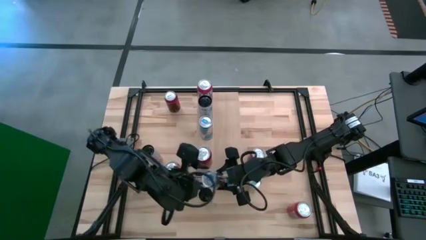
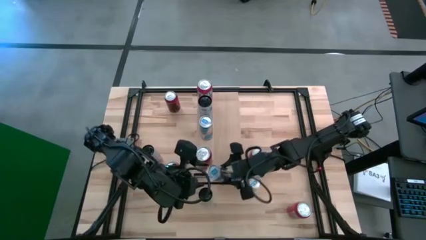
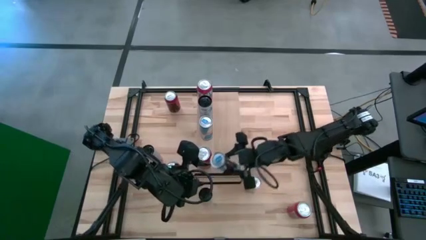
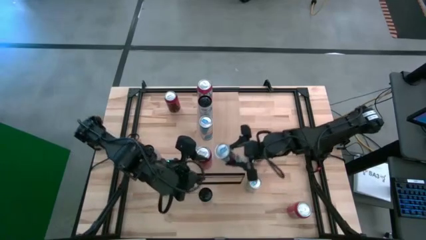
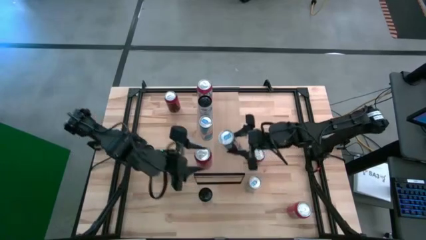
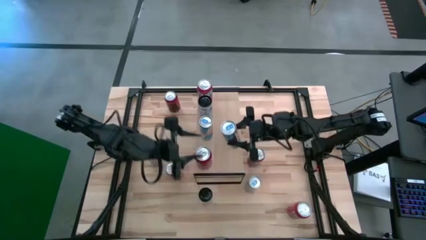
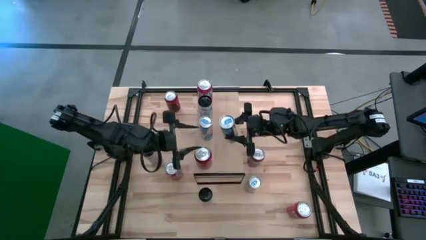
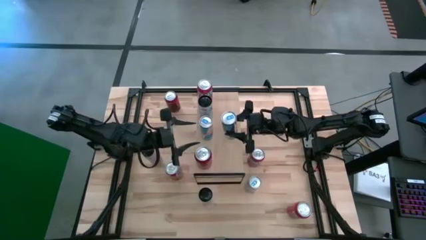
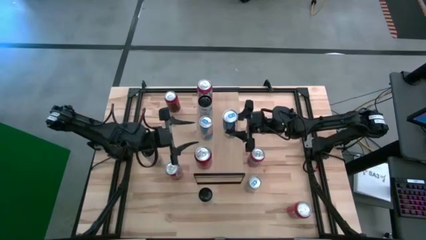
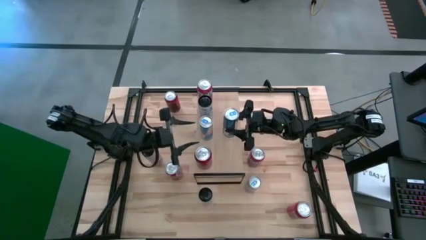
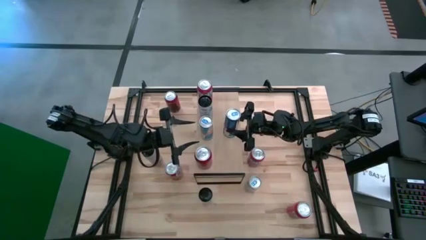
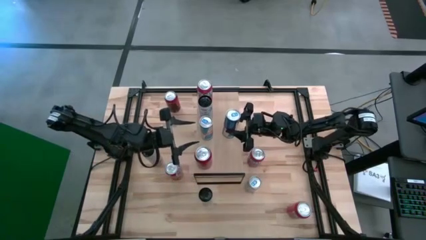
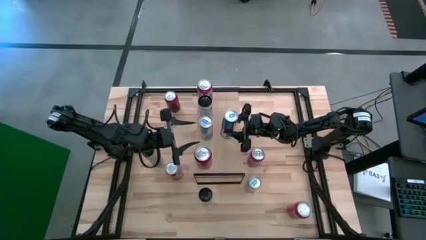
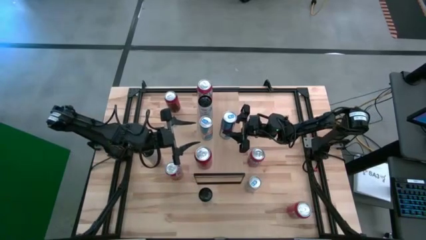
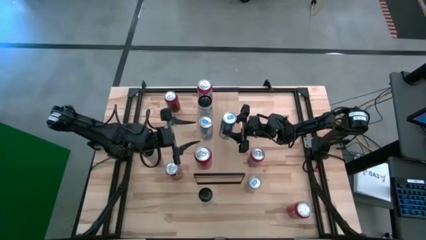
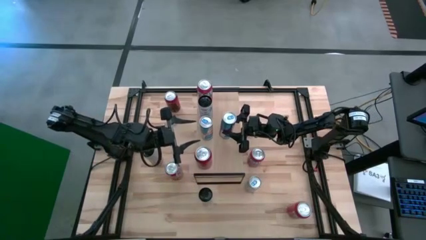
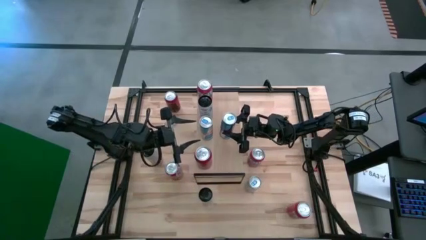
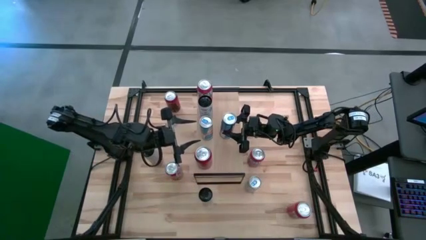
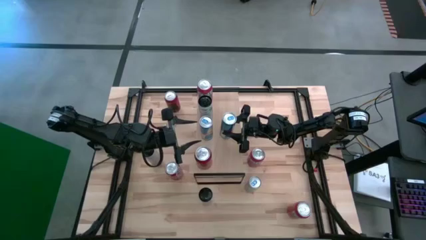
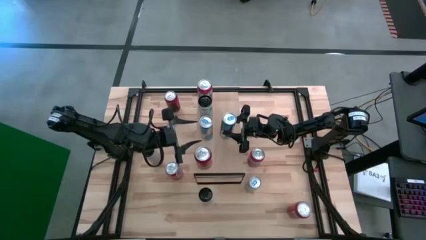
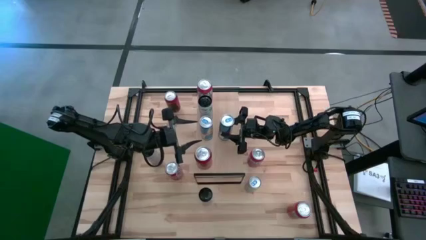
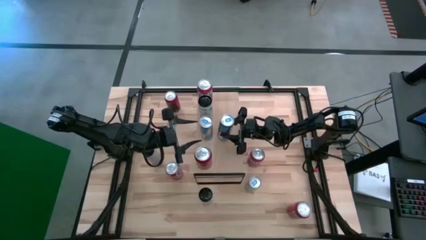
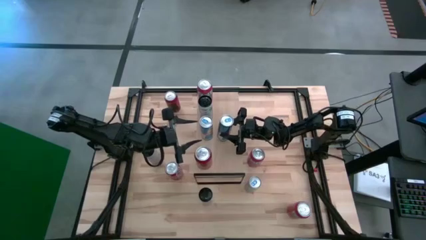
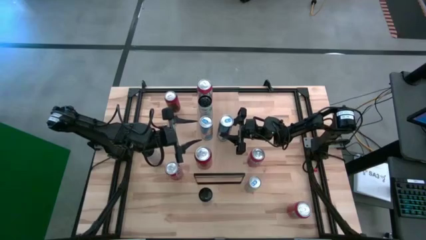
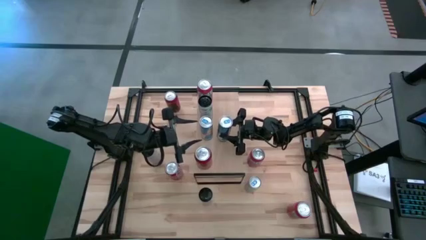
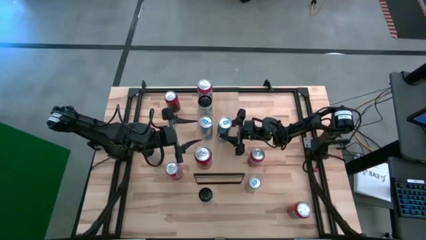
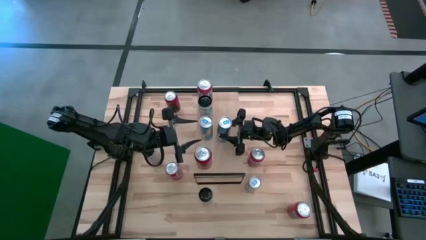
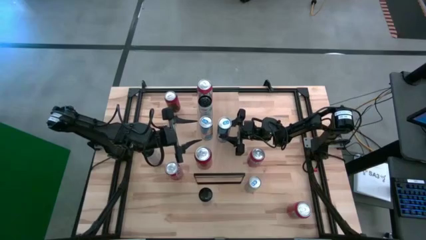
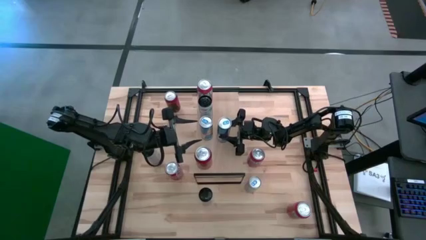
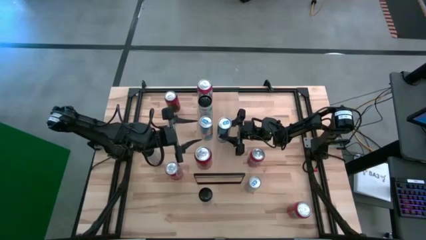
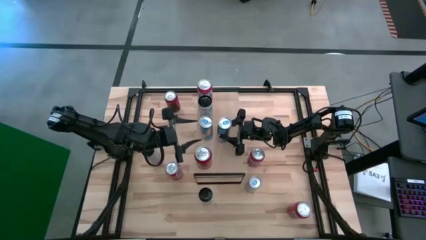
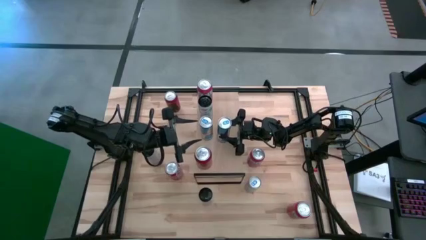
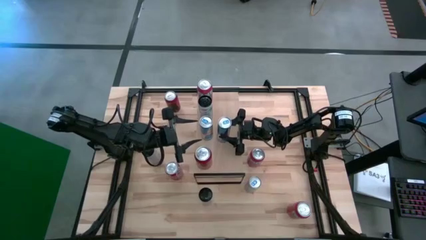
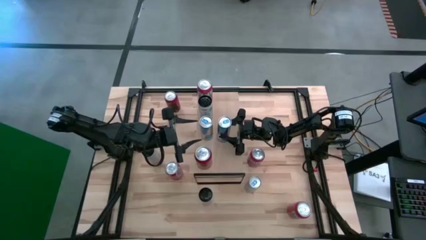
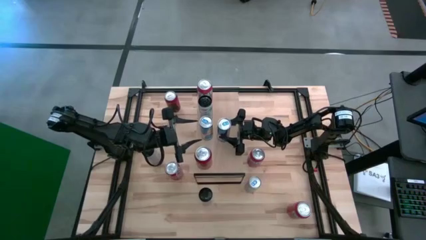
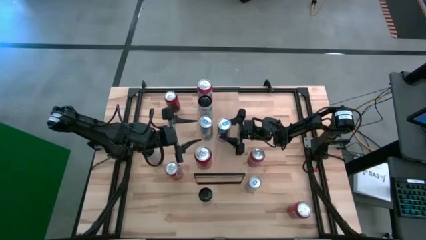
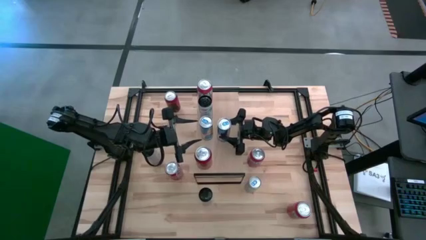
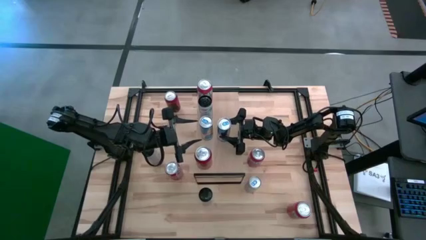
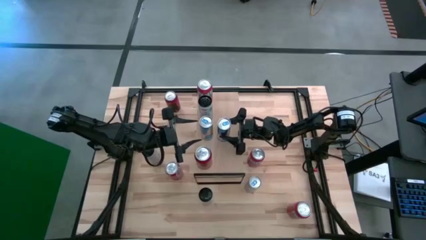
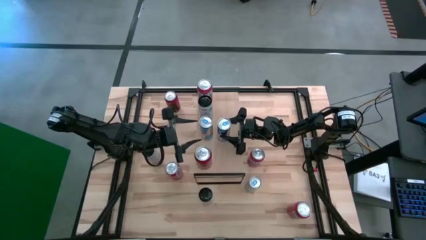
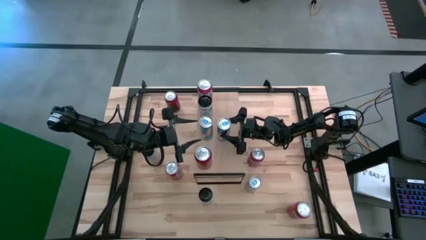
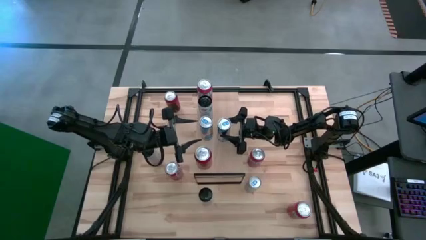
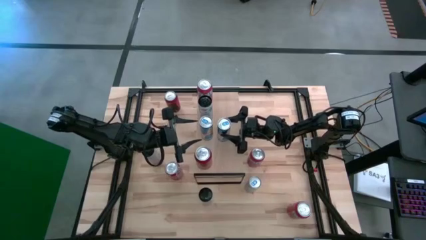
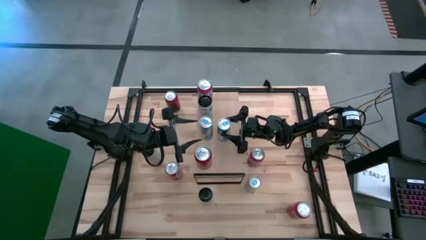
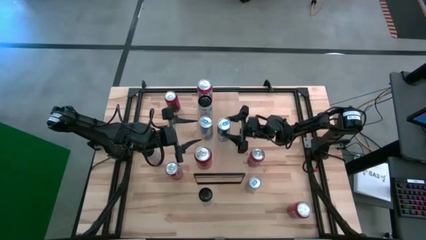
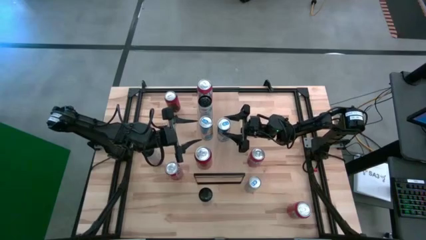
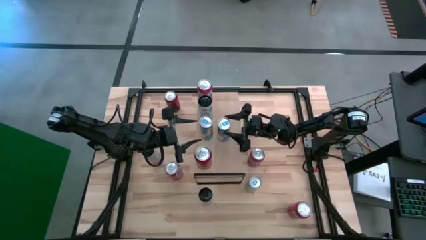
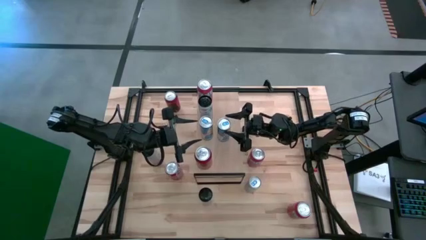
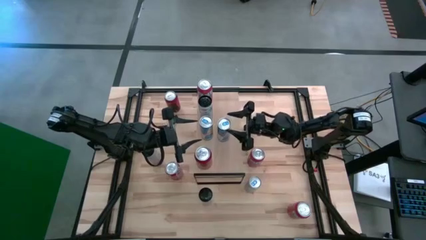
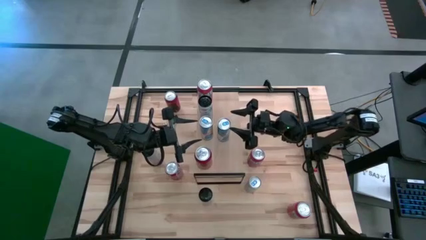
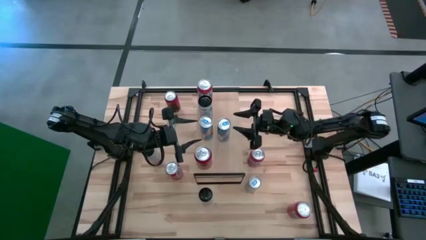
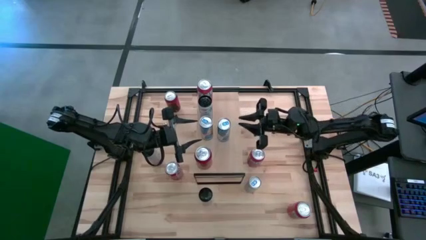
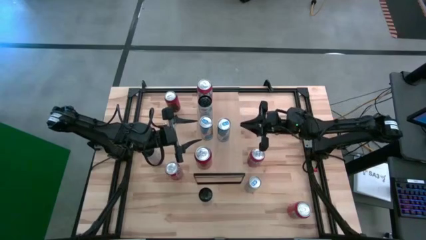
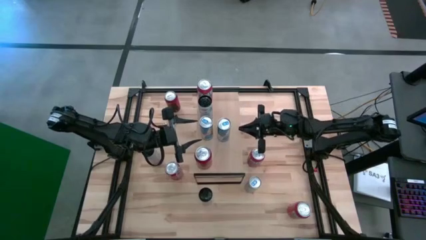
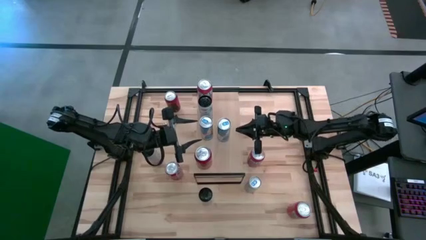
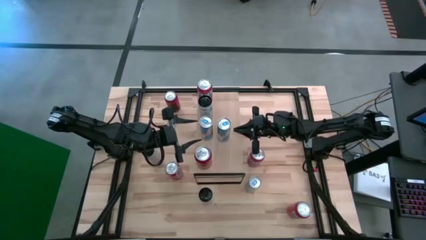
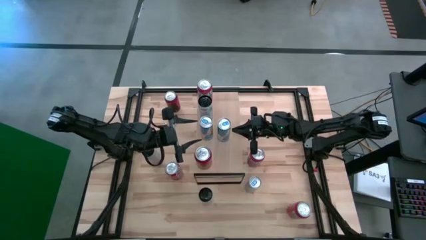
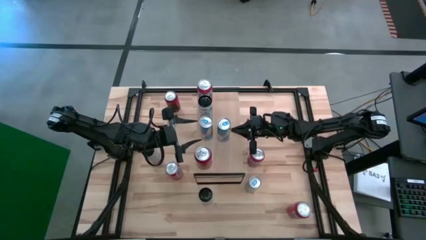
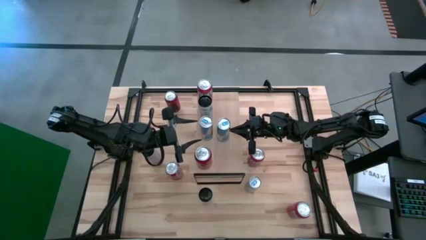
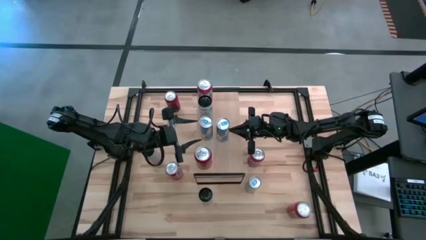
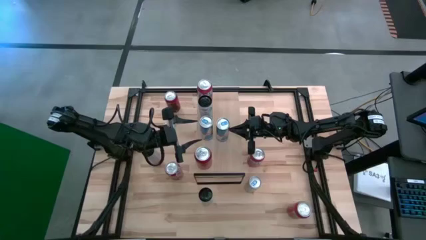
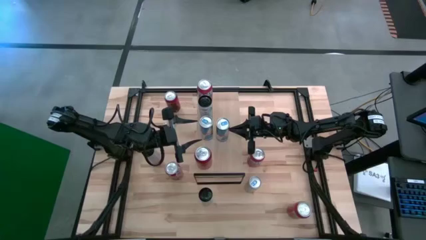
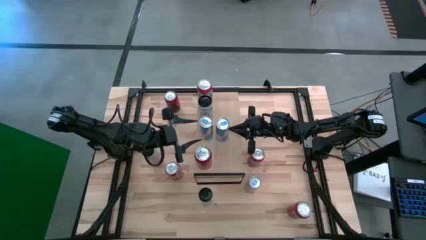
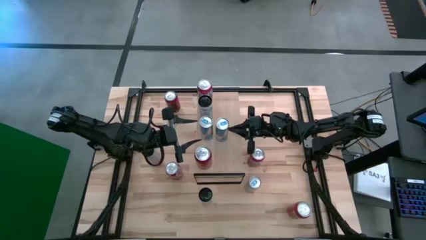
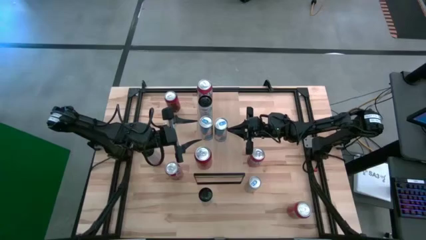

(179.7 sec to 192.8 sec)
Task: Place canned beverage on shelf
Put the left blue soda can on the shelf aligned with the other blue soda can
